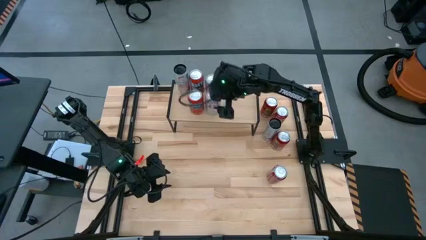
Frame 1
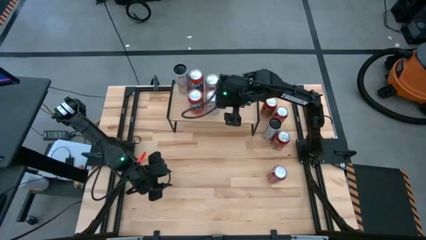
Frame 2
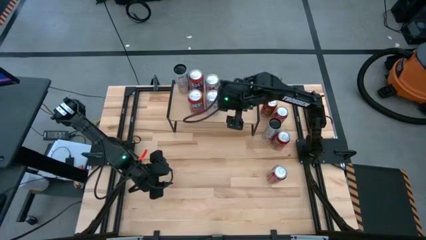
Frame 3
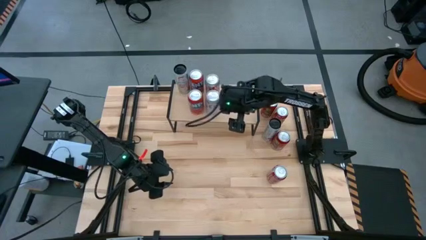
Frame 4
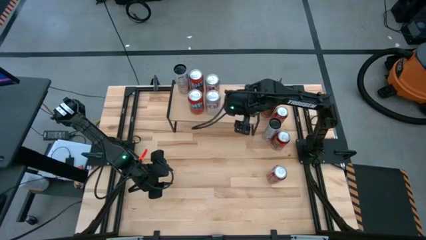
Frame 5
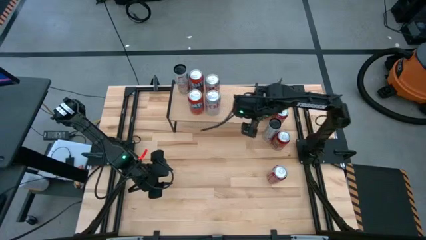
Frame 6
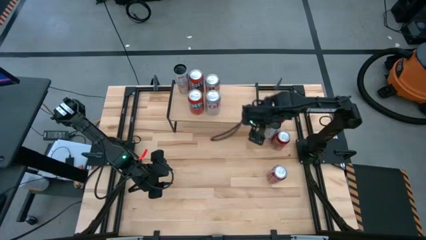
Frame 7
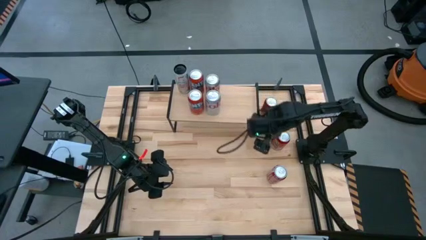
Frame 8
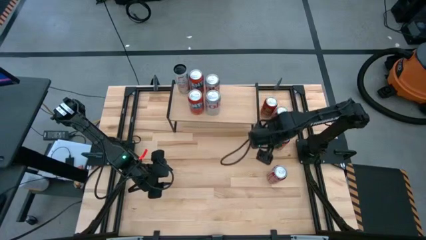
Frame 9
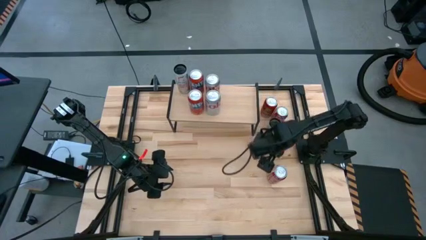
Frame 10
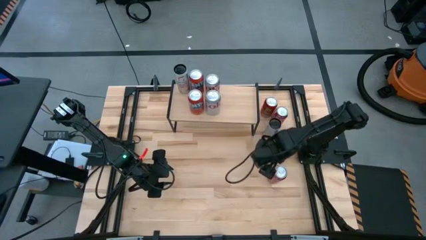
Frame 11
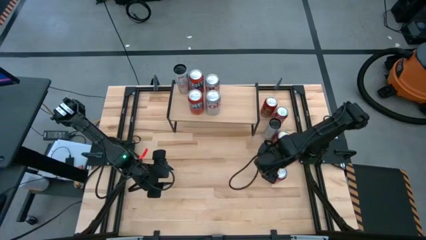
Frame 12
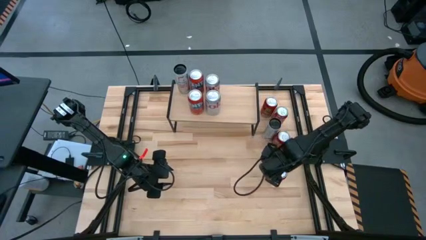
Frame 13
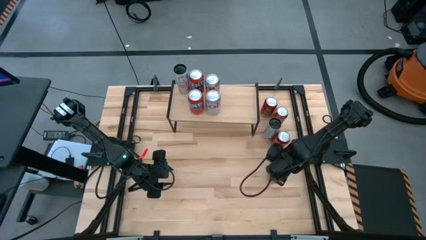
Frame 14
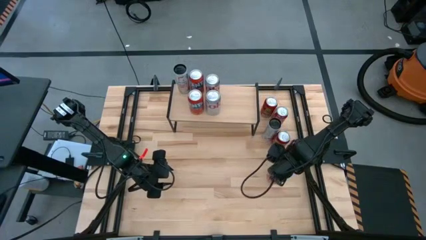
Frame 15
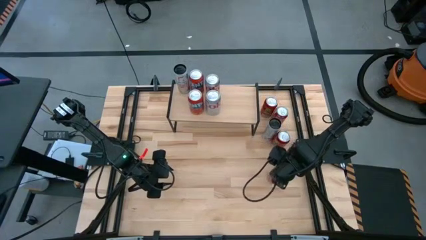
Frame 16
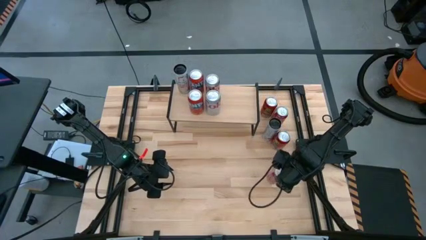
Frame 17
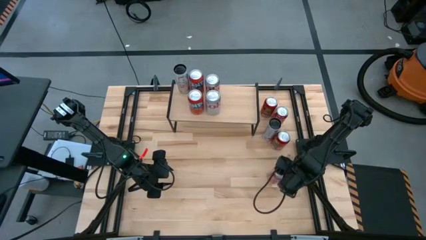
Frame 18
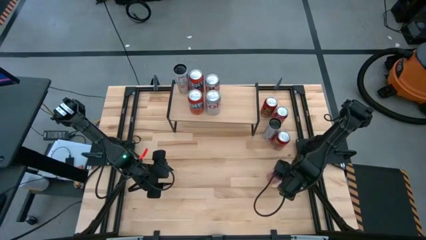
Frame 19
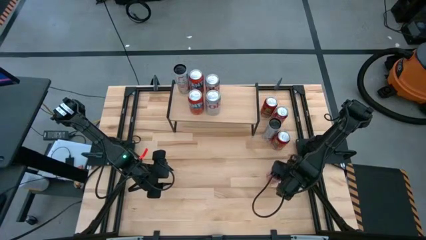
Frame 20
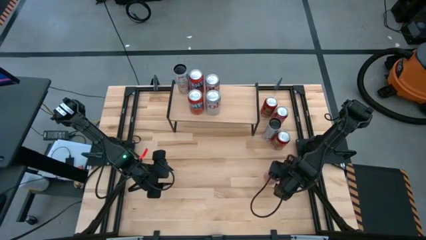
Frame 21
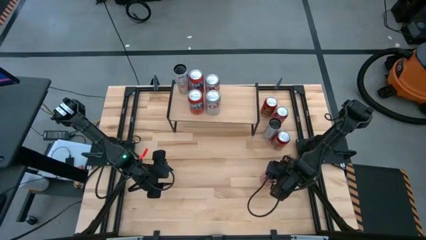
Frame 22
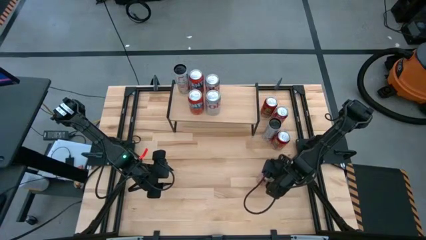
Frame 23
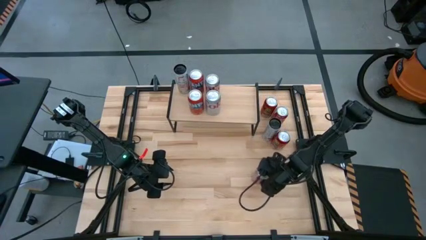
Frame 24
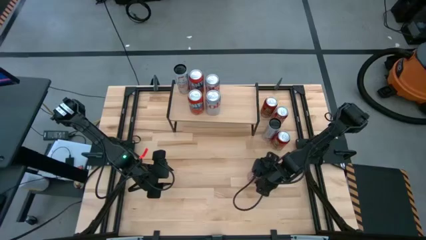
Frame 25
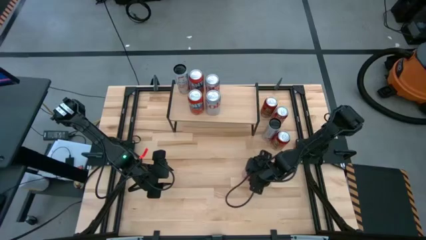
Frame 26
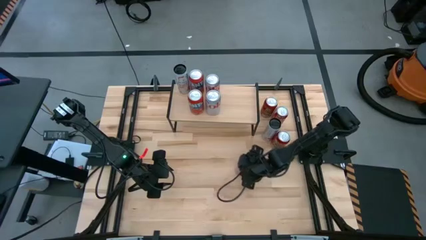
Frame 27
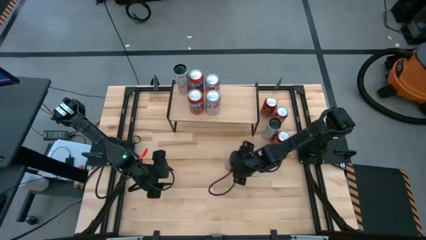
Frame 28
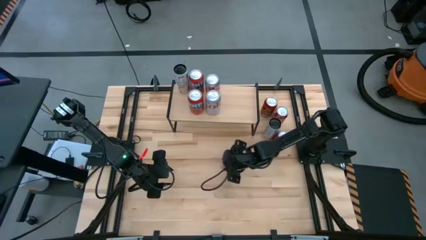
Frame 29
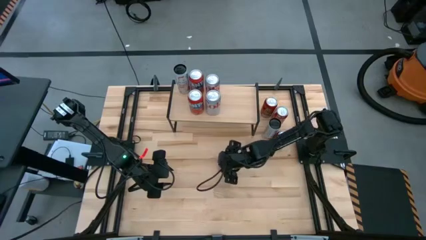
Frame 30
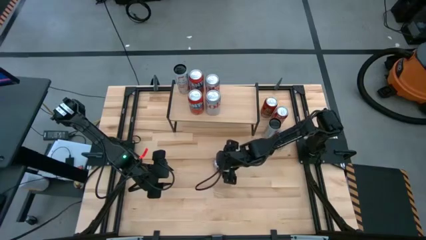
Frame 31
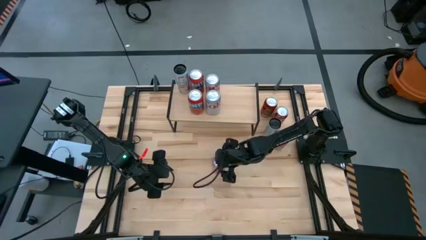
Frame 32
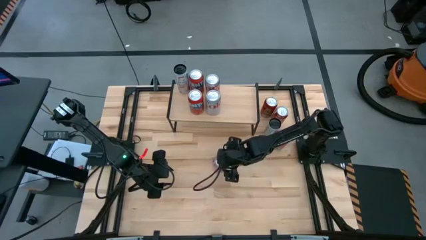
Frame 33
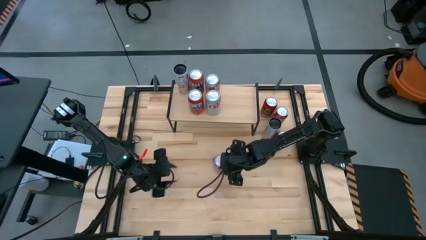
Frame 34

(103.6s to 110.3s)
Task: Place canned beverage on shelf
Move the bottom red and white soda can to the center of the table

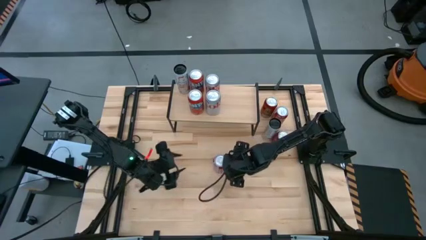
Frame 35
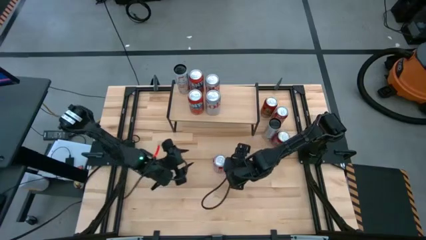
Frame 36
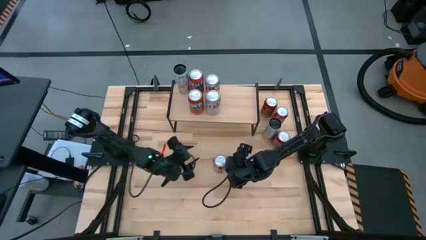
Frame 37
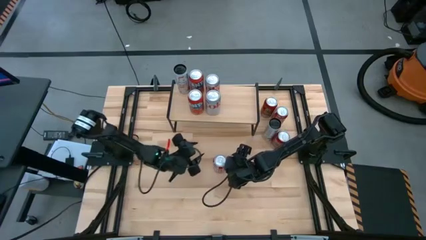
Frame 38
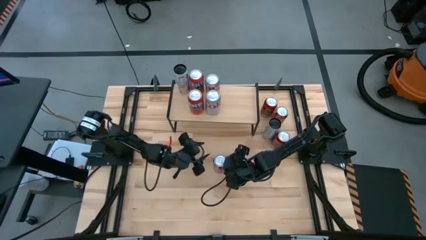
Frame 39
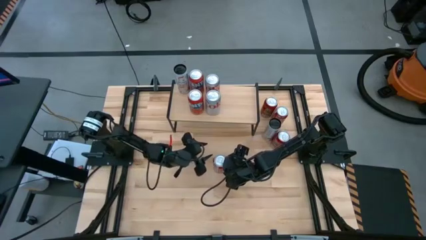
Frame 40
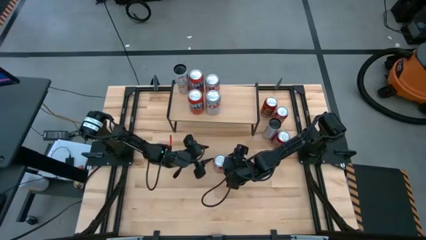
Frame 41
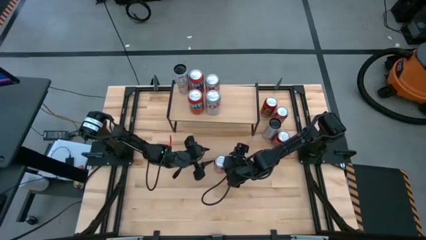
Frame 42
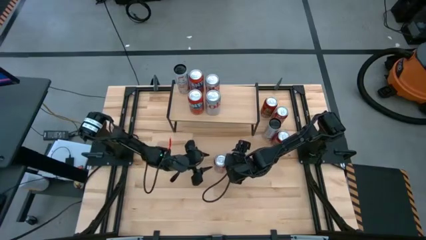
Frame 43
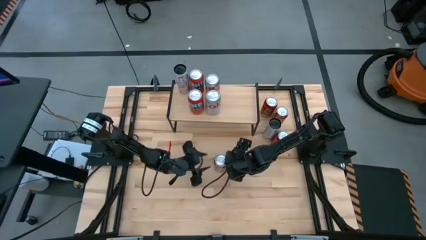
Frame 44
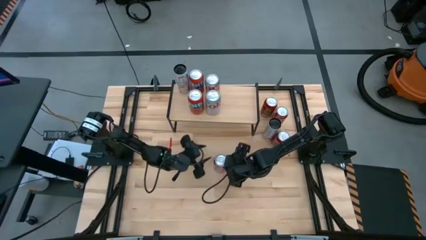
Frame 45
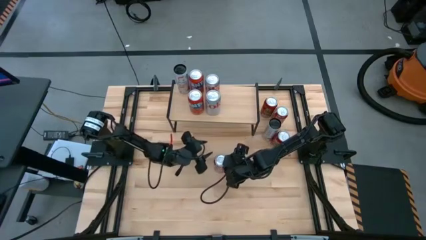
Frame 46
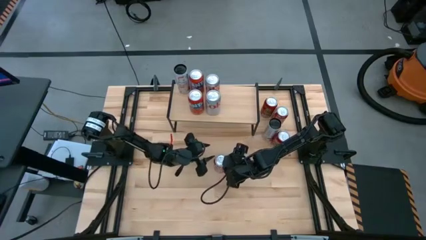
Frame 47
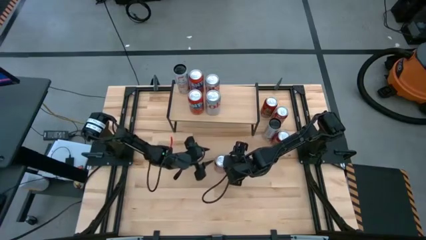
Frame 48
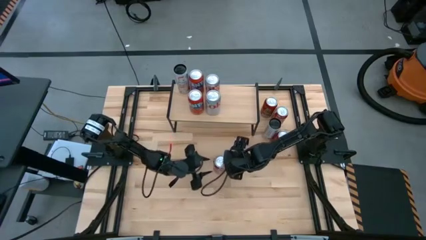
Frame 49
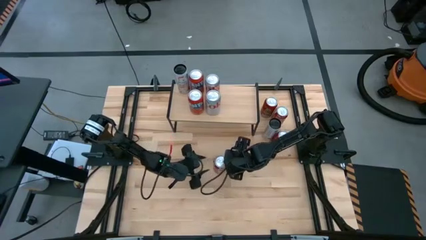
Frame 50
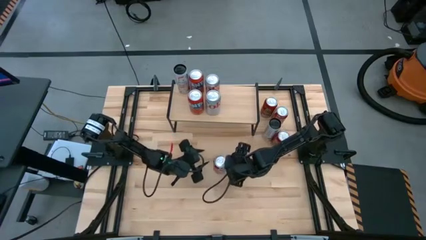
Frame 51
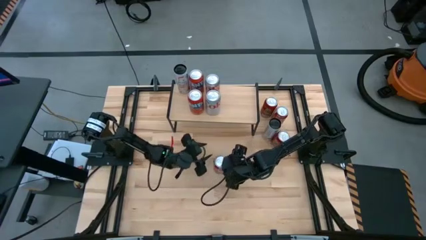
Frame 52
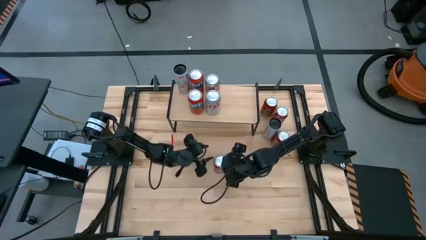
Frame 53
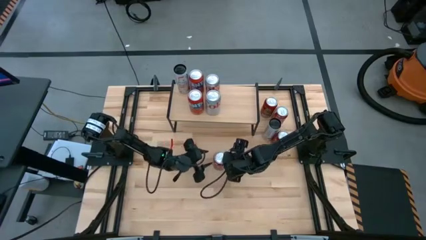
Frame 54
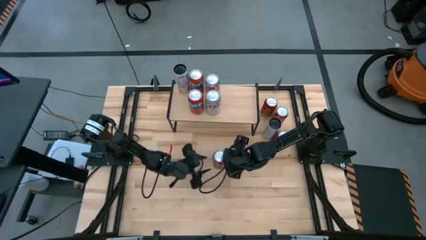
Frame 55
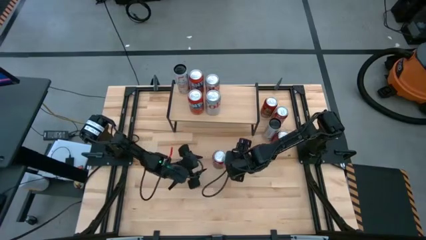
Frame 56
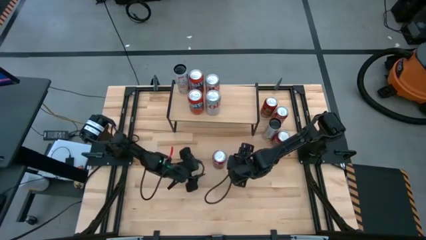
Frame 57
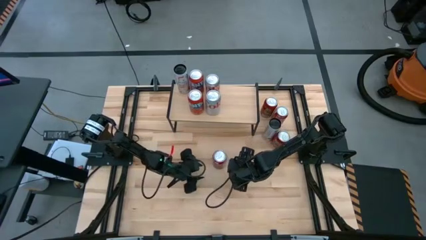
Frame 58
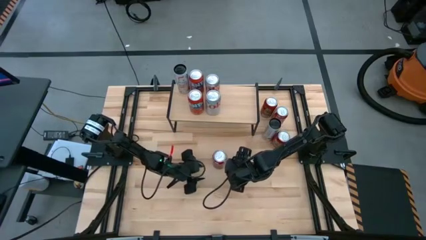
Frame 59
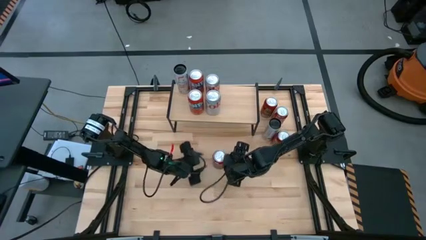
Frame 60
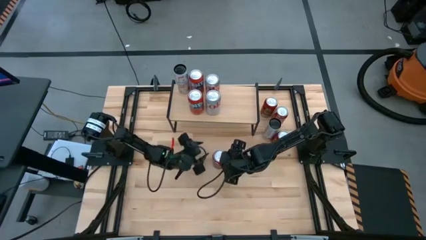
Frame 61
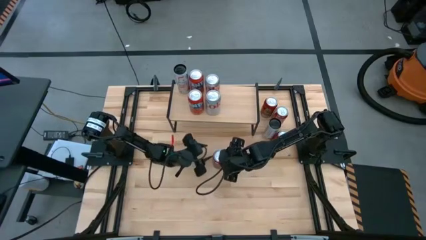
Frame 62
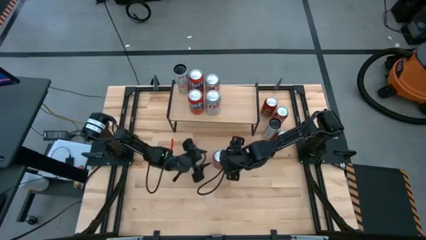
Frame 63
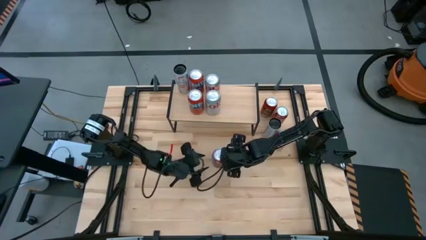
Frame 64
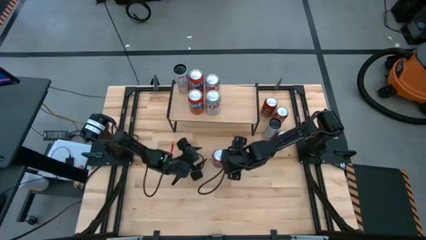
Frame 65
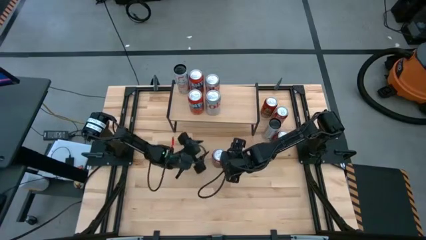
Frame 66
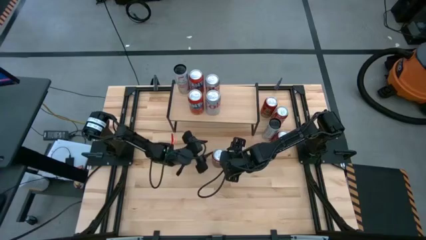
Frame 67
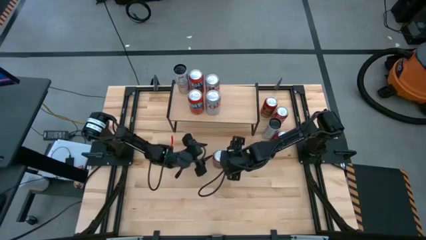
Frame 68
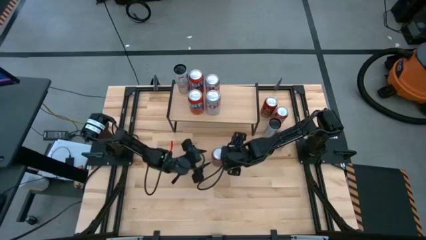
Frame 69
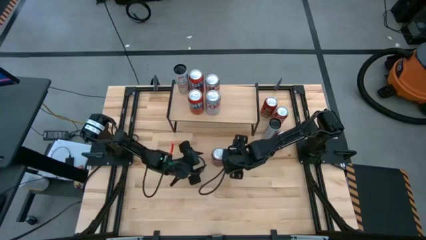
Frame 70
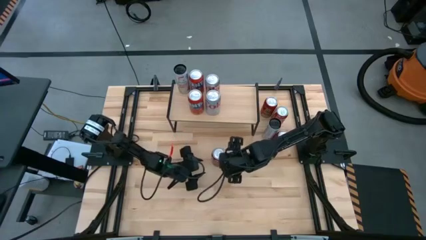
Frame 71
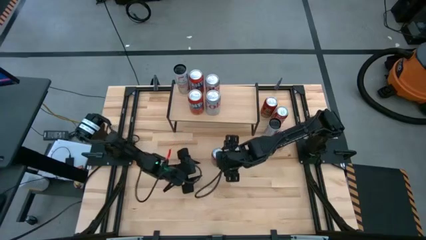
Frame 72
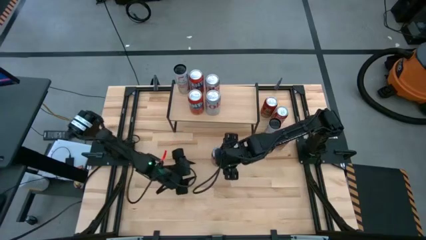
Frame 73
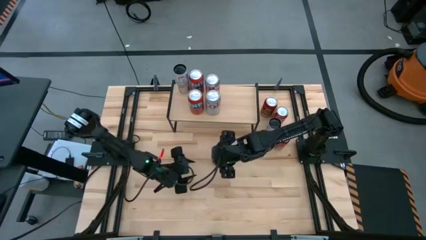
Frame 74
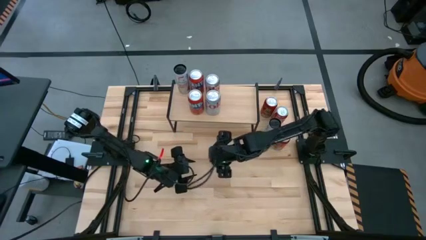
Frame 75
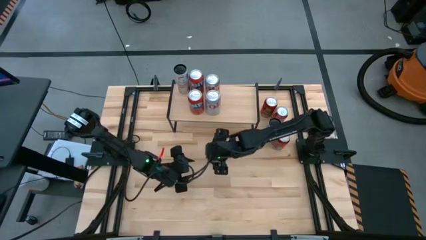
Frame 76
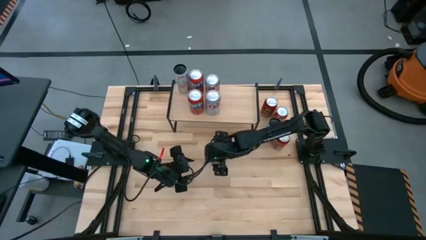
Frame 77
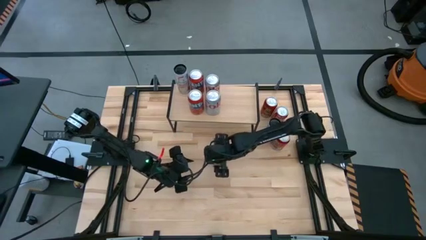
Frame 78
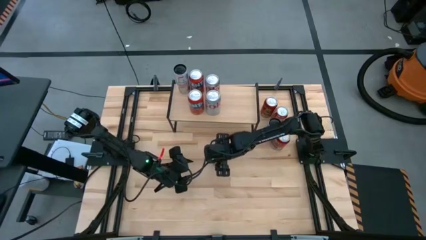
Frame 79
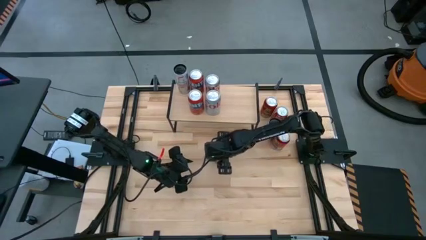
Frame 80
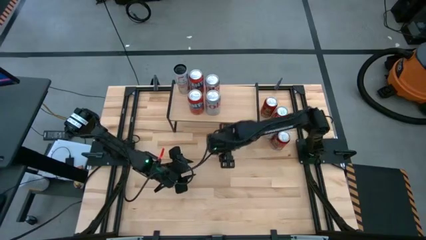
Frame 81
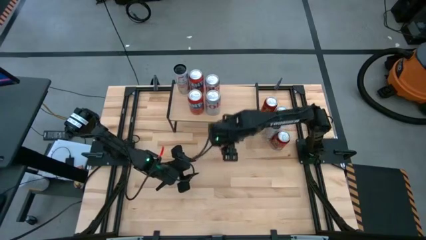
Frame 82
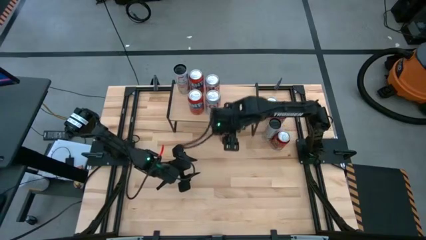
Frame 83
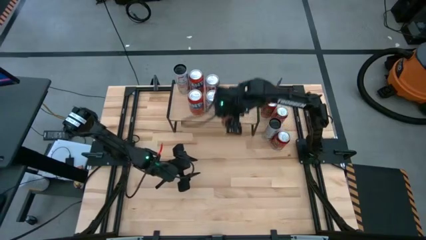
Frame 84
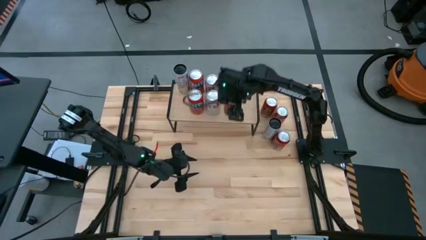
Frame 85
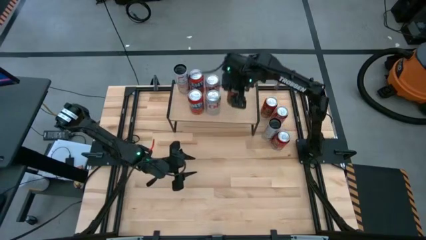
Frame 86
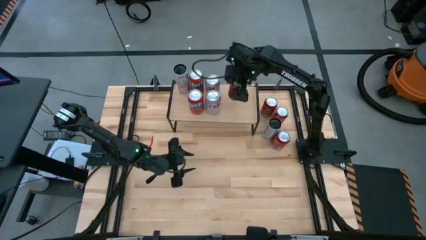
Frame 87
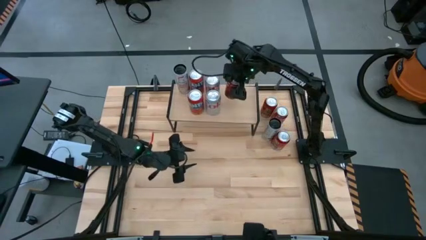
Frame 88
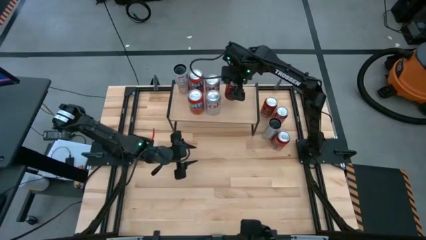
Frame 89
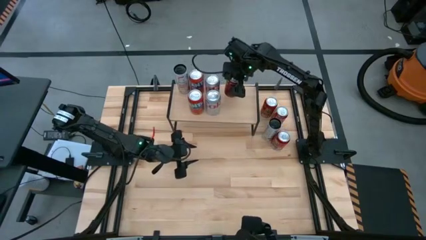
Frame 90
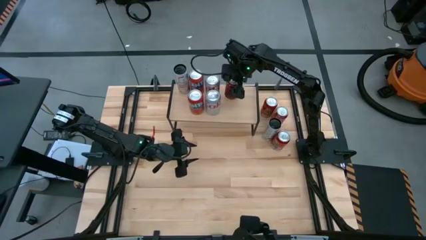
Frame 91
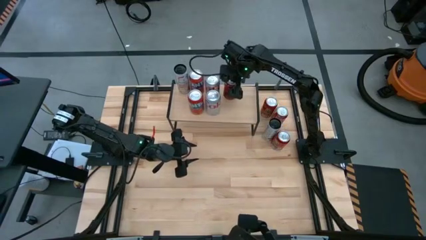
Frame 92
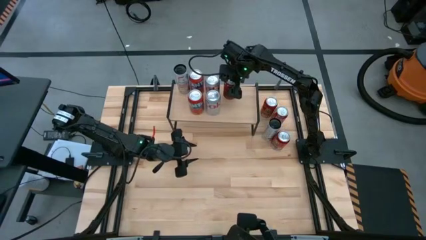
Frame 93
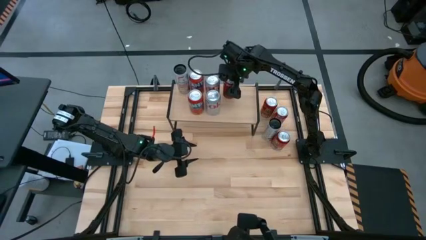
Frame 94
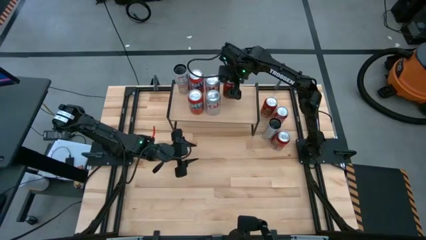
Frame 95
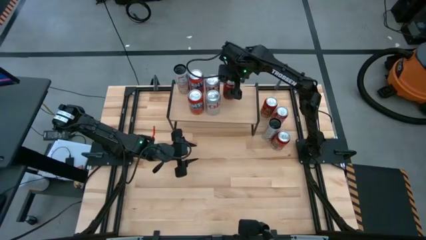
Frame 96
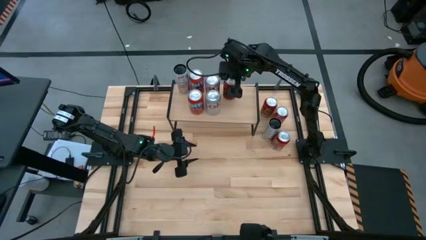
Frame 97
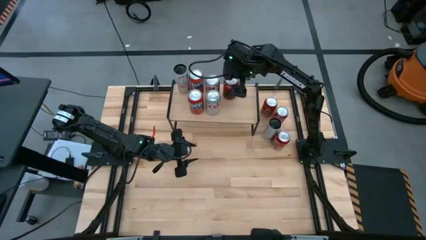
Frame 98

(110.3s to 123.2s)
Put the bottom red and white soda can on the shelf
